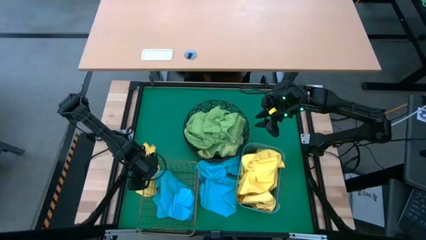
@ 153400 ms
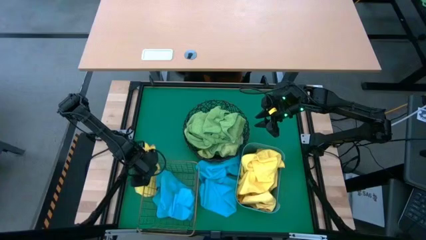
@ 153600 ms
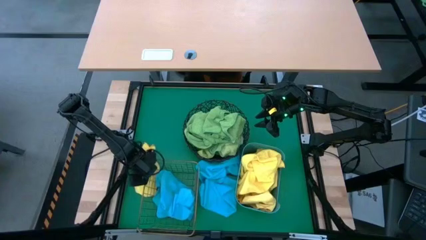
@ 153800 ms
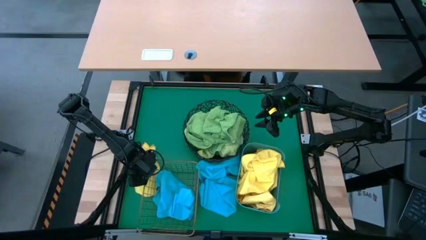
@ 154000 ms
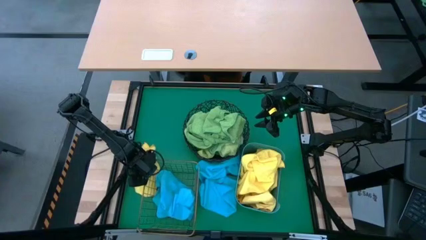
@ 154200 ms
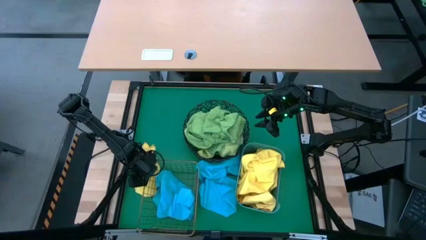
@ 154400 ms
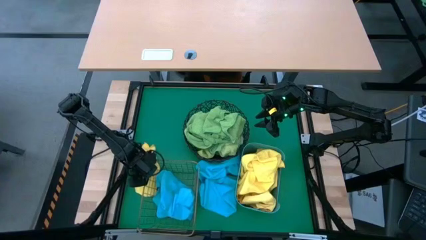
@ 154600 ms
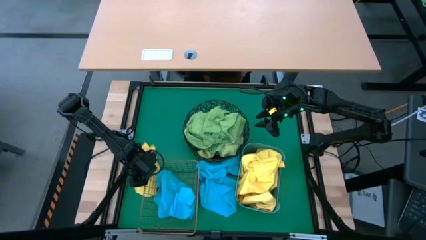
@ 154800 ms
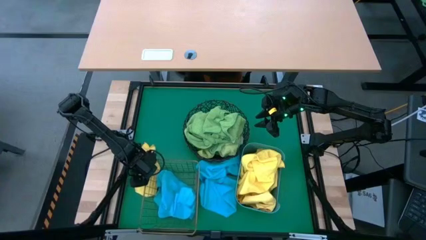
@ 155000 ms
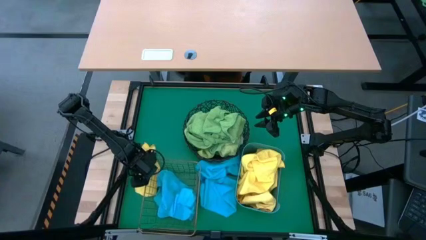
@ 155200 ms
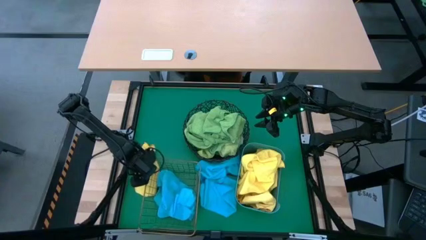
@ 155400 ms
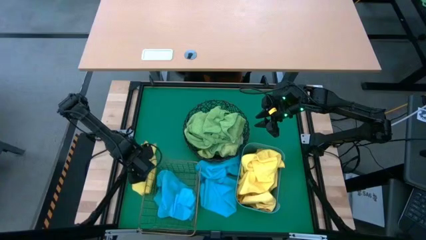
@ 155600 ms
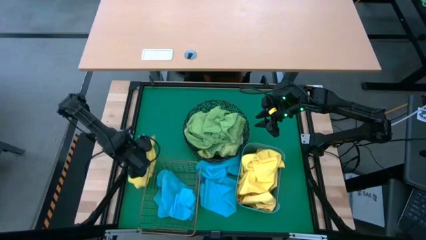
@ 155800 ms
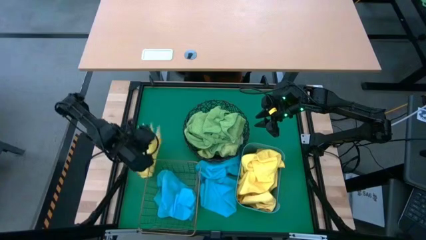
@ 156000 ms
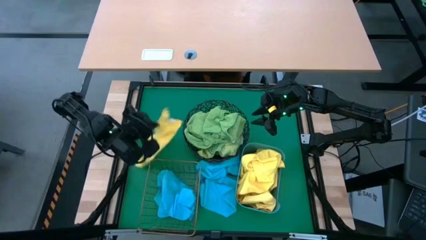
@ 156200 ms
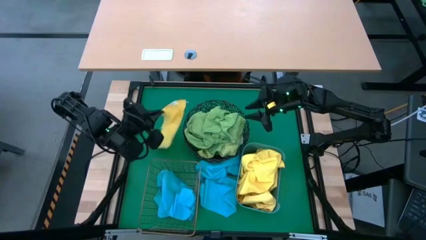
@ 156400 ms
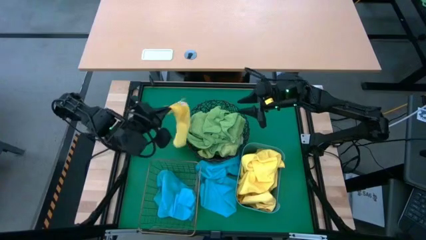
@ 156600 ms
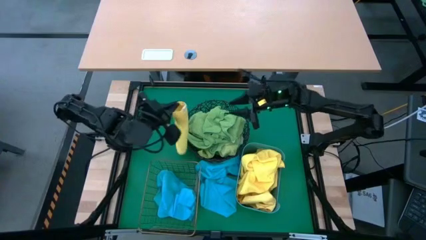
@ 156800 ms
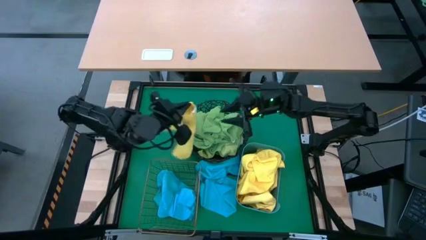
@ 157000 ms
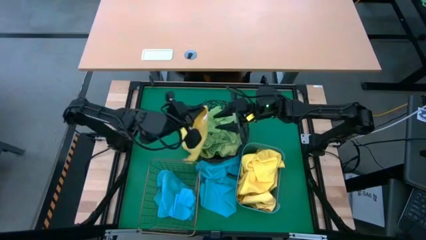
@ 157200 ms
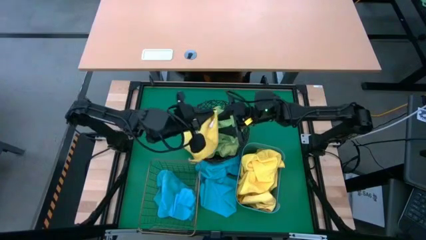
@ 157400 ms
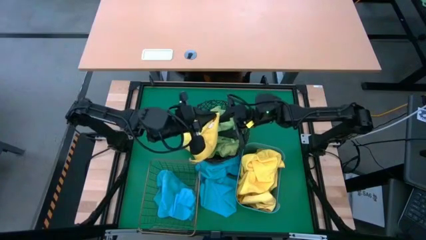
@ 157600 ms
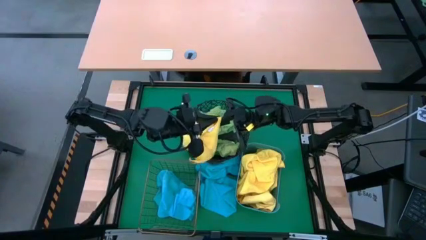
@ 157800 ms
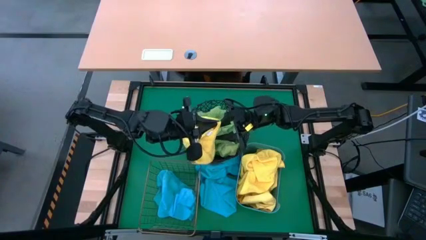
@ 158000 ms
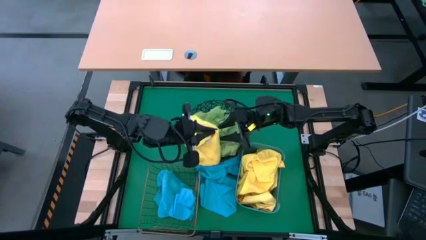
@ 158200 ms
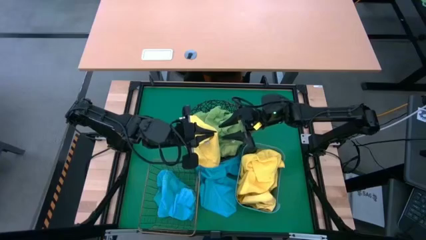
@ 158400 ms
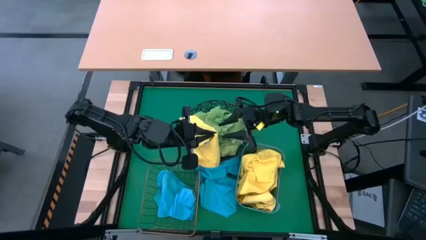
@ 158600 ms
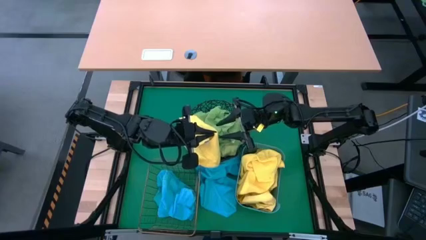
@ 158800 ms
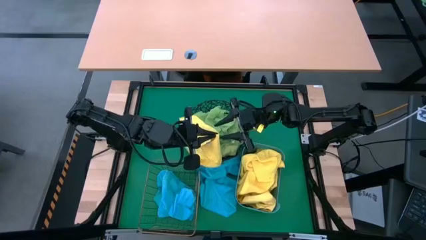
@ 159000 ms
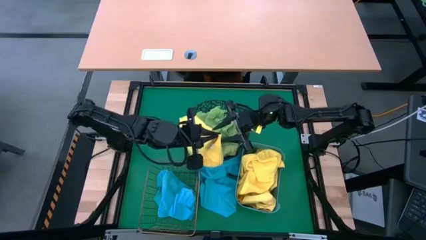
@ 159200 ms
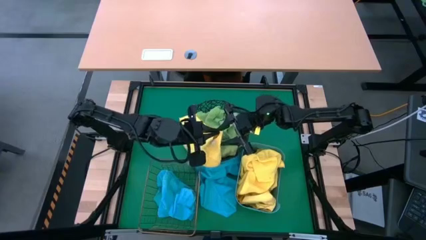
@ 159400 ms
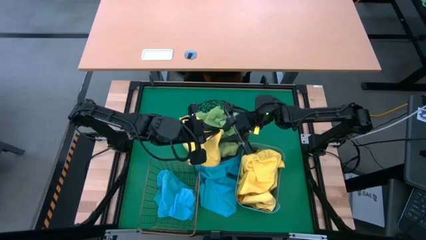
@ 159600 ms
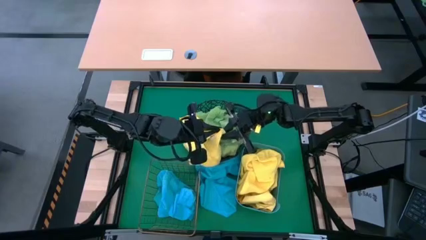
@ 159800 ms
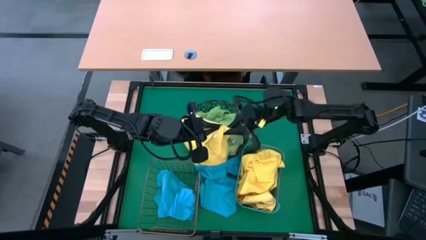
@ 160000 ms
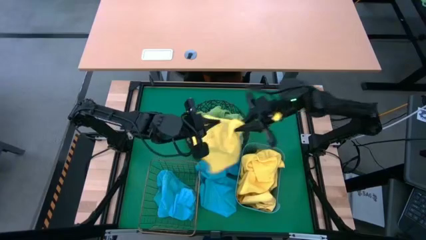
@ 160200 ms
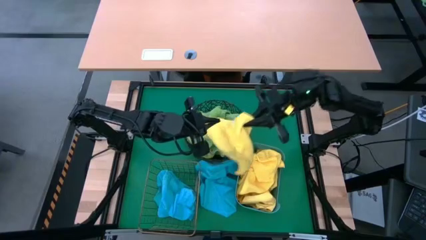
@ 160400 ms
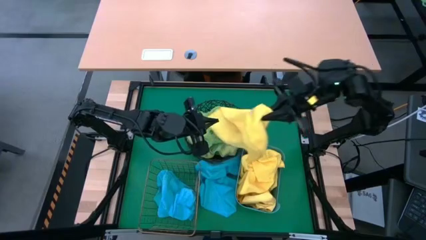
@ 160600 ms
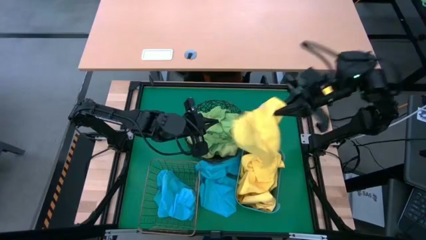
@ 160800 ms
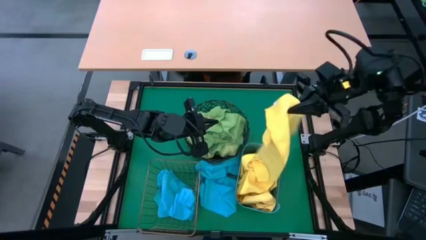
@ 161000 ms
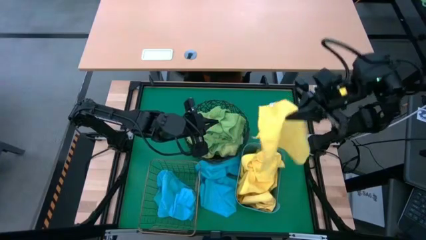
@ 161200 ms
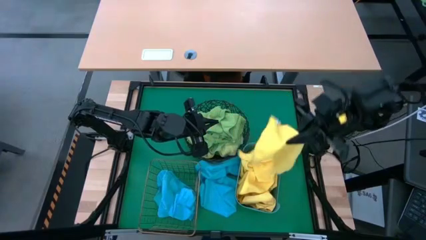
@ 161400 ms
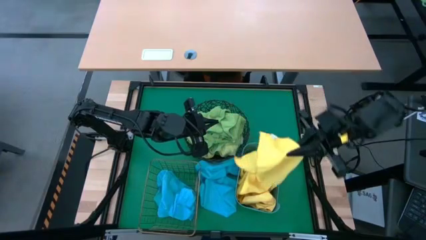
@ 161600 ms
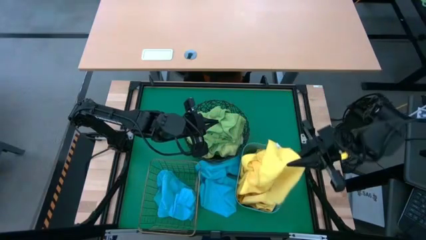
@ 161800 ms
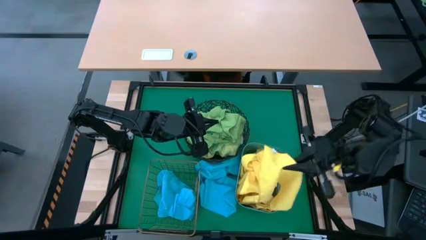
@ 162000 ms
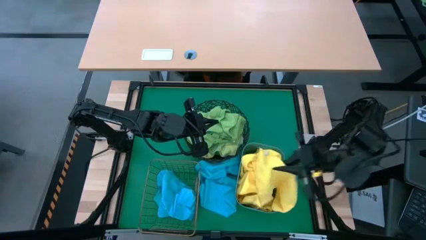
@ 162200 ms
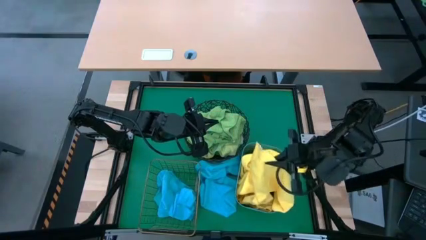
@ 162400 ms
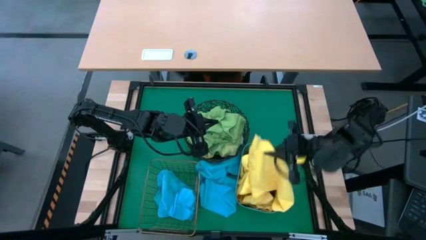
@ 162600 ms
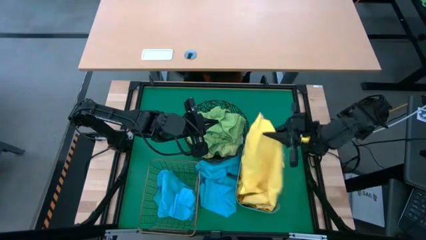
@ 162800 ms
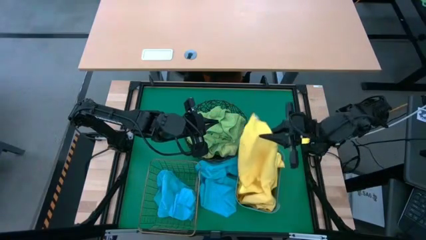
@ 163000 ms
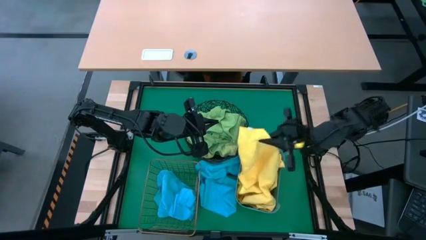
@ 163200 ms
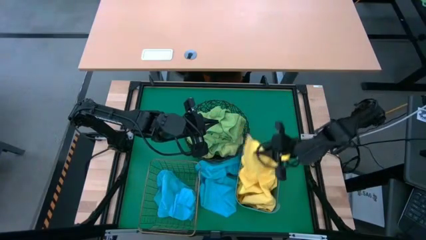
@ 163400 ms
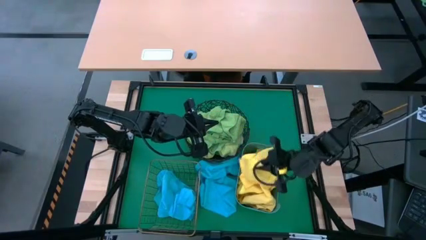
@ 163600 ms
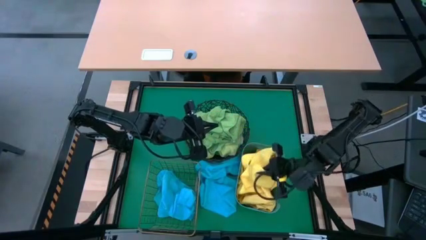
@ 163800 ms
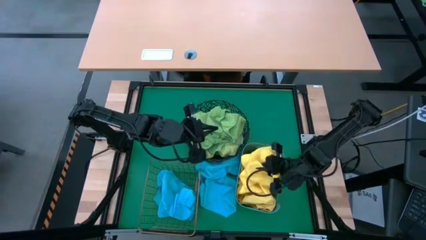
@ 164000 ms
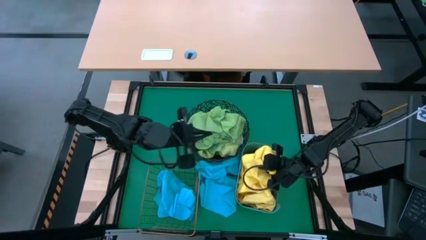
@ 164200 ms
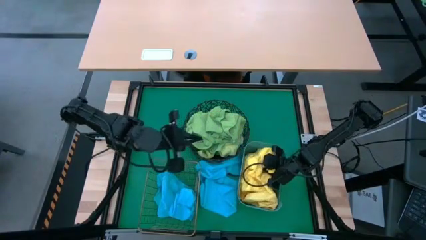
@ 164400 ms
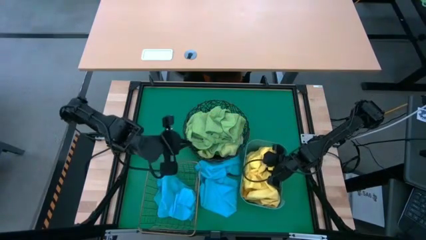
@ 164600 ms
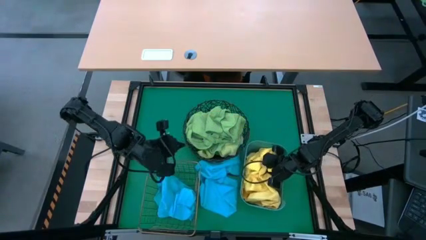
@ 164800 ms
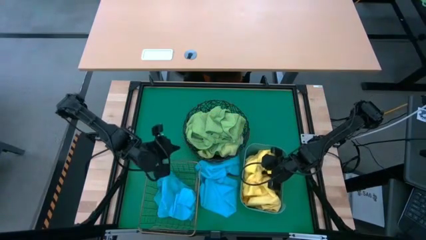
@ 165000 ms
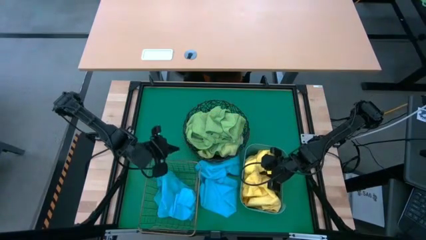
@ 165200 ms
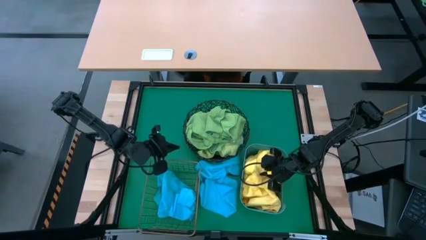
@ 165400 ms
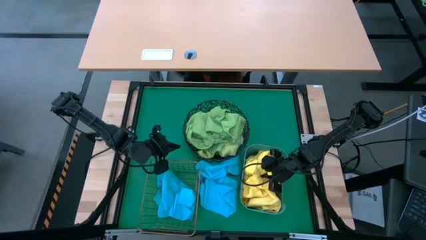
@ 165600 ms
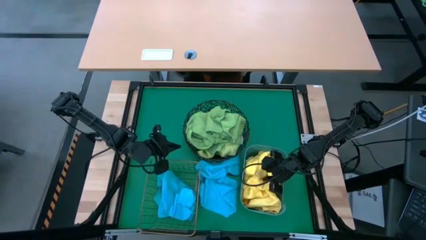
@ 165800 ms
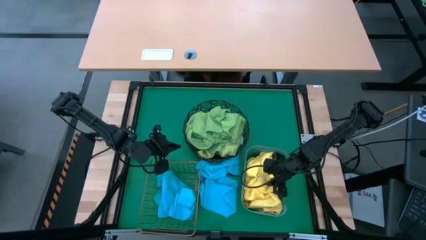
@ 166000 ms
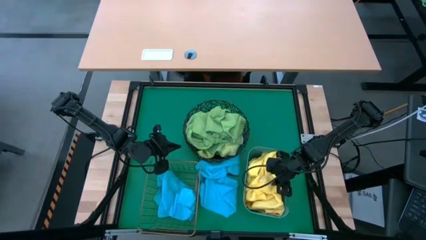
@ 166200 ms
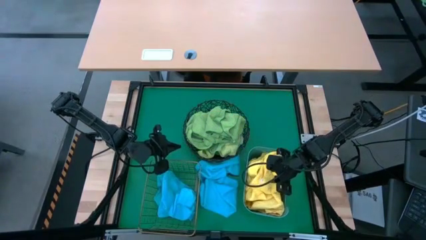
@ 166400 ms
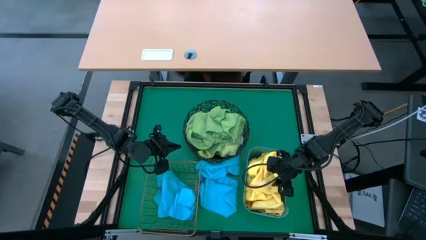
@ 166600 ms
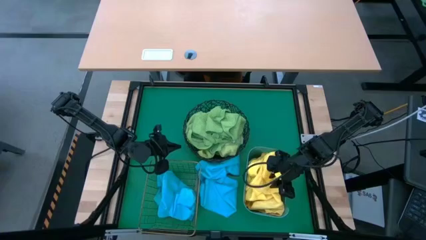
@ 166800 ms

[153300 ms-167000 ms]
Task: Sort microfiber towel by color & place in baskets
Put the yellow microfiber cloth into the blue bin
